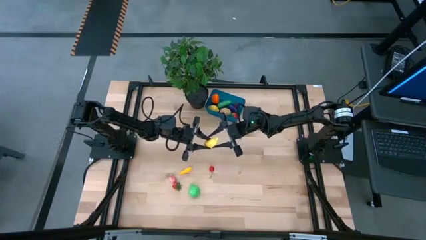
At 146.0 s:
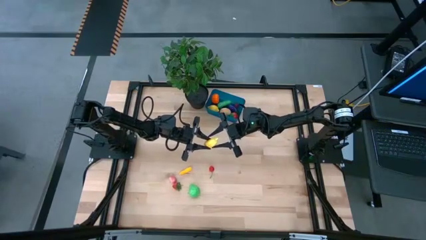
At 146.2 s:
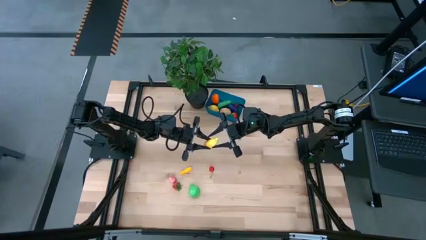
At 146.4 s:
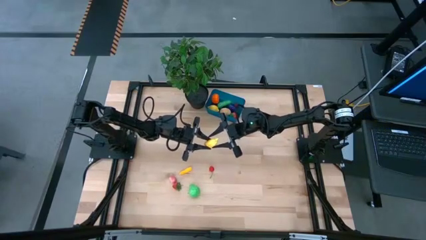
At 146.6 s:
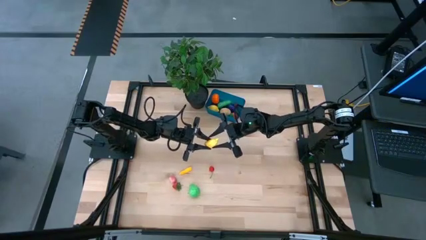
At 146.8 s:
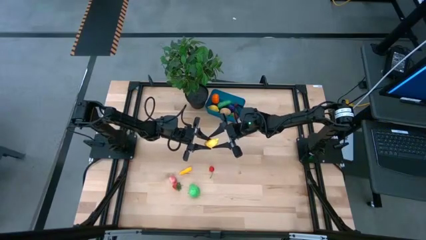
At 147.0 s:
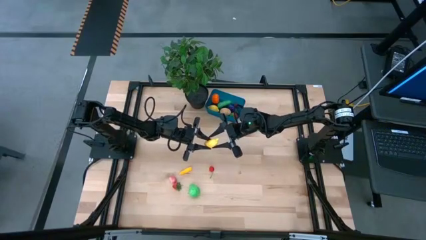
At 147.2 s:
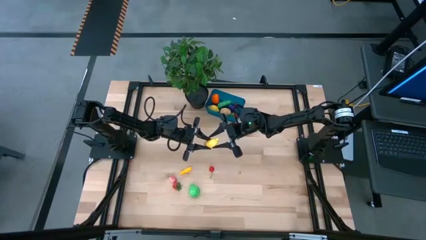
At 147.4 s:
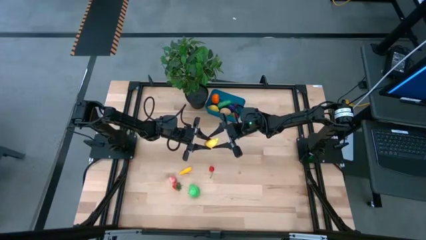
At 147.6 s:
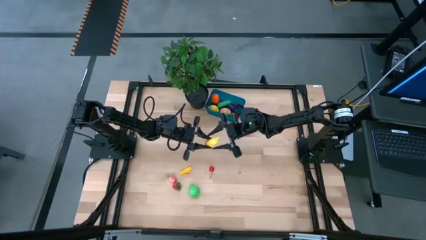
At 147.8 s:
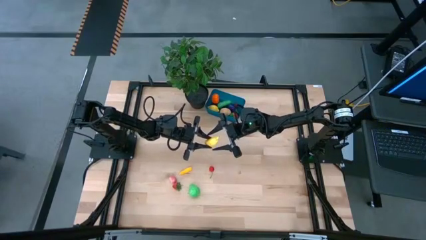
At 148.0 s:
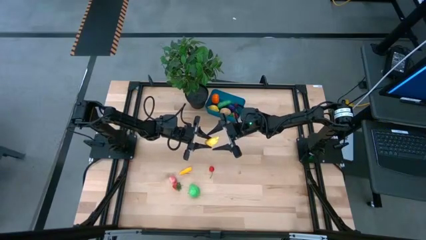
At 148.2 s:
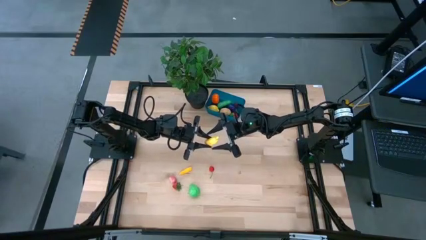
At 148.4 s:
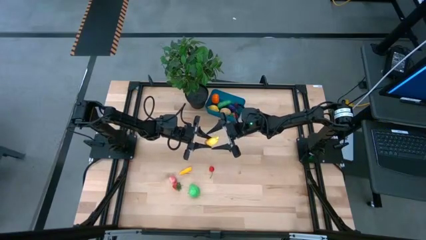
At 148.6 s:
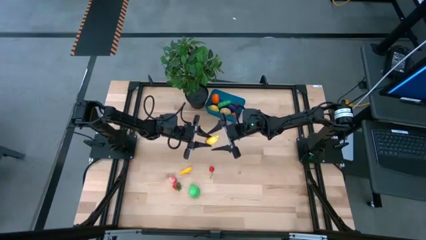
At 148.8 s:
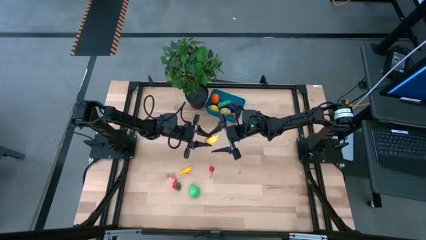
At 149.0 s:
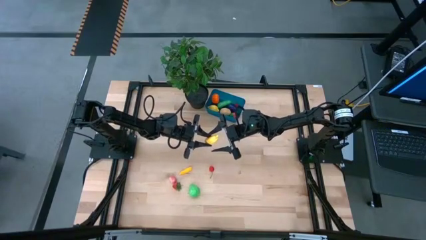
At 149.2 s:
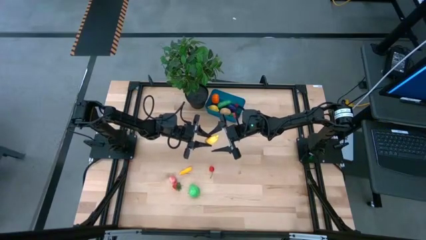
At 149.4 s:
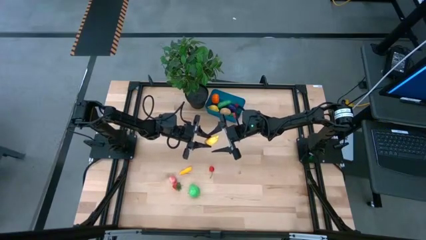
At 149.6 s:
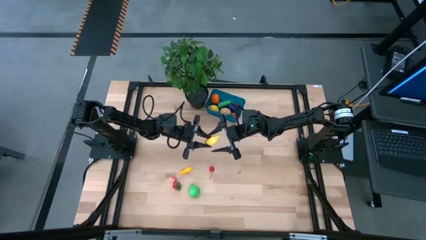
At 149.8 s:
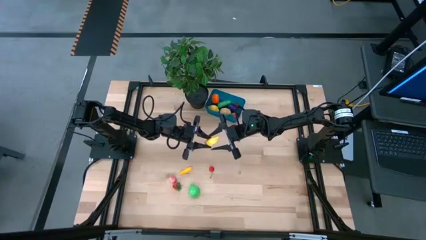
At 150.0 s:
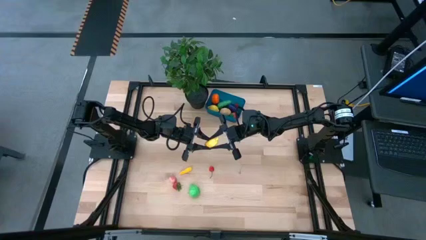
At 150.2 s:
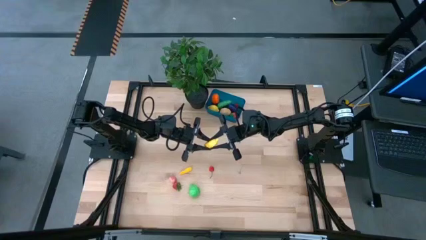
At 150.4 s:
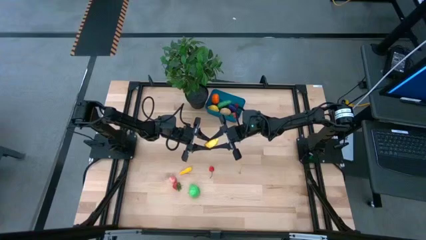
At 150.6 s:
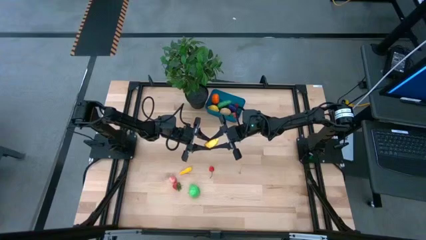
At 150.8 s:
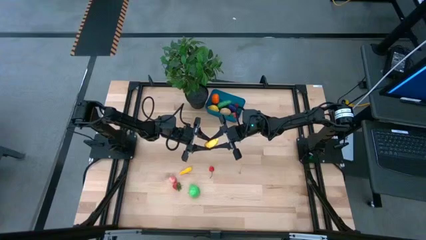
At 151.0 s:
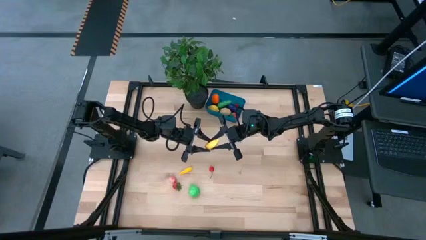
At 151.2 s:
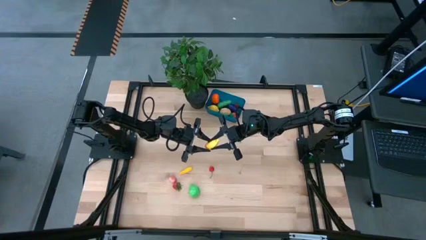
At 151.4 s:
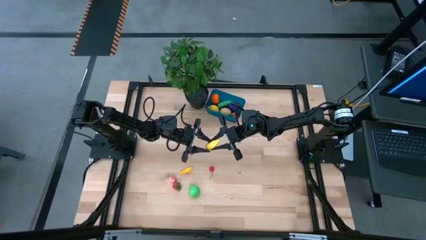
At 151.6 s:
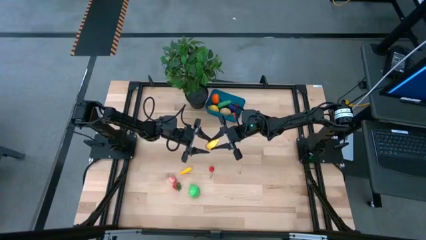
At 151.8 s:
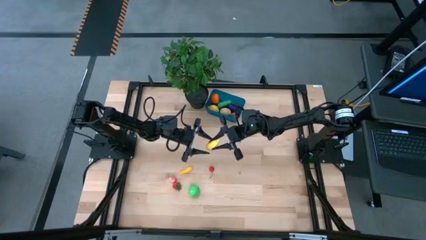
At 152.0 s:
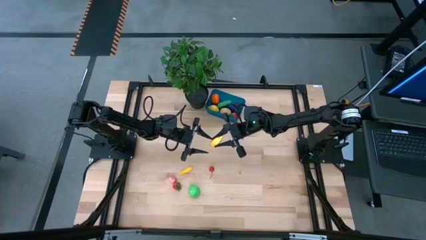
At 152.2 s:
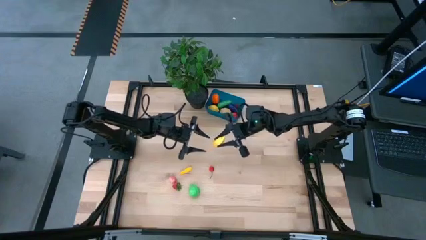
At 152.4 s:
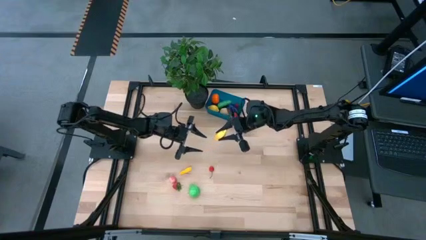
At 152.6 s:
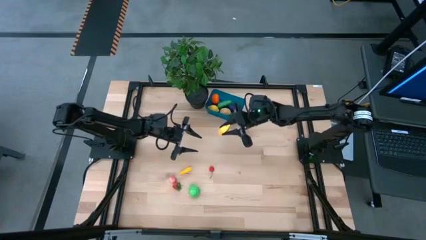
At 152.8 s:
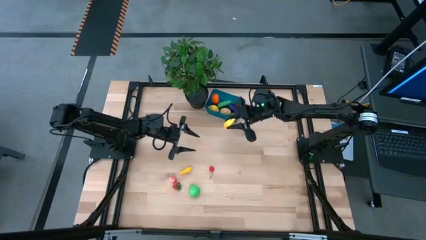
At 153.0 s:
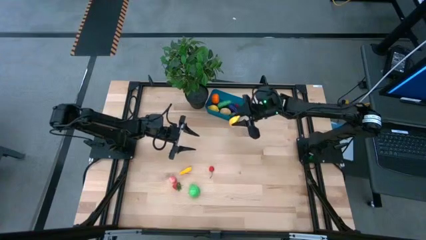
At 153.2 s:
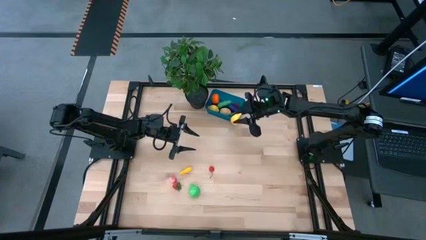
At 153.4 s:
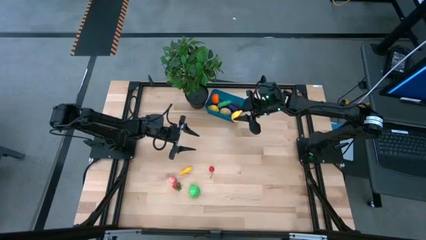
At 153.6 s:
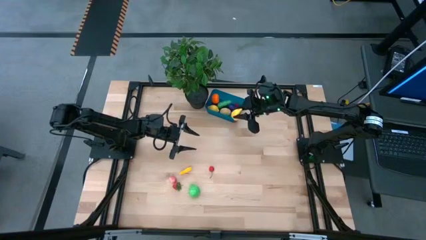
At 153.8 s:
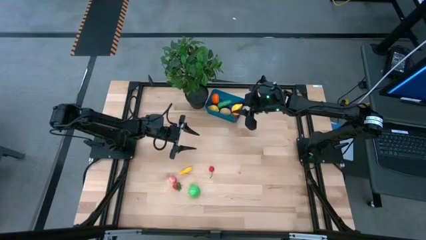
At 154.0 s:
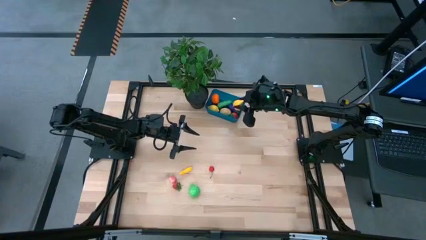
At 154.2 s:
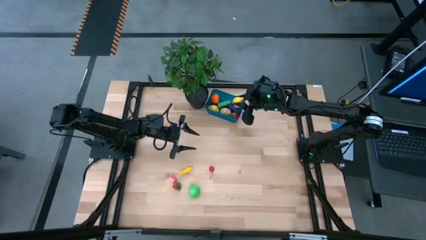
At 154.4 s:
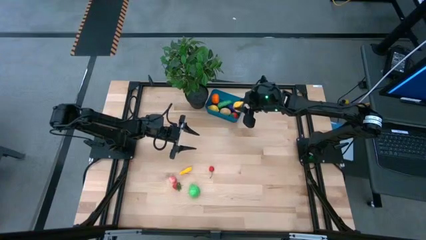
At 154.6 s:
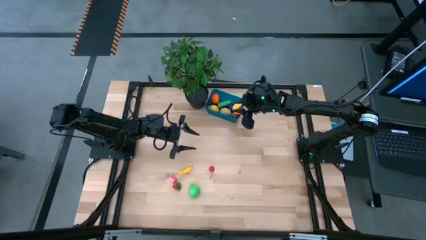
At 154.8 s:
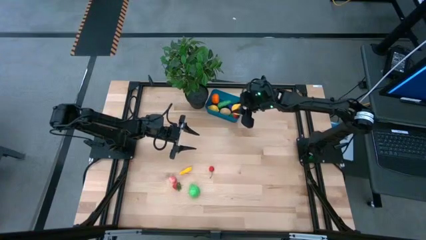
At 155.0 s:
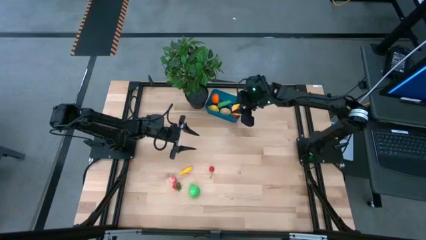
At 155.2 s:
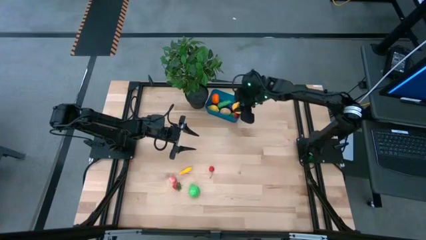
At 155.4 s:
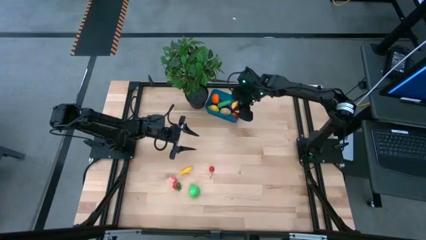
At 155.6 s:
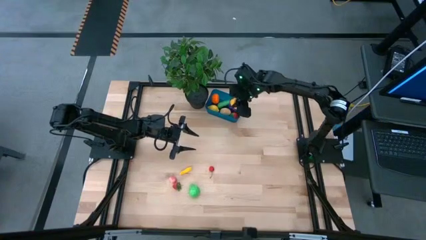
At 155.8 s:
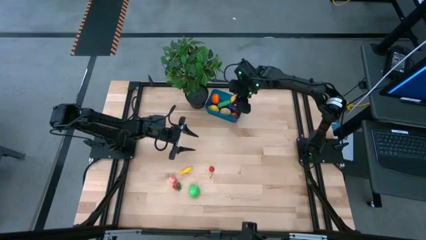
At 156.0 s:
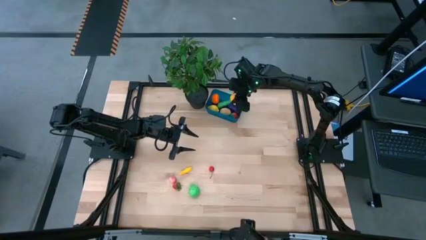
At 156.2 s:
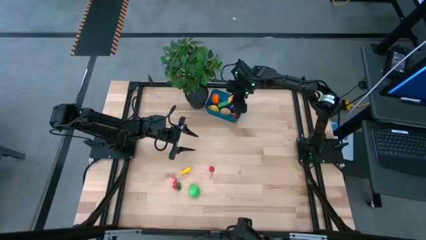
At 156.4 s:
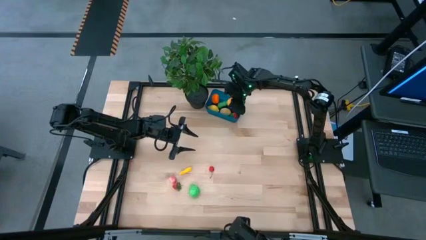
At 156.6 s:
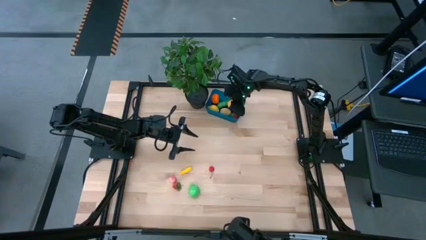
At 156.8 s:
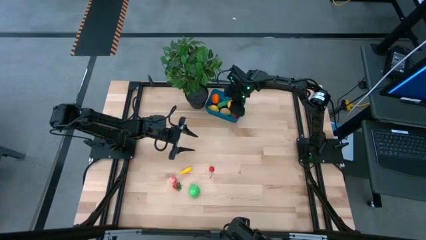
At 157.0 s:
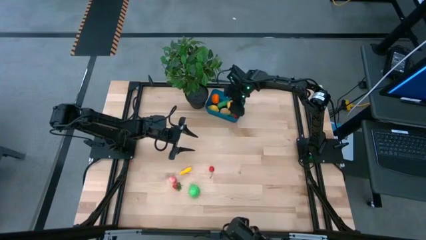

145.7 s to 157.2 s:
Task: Pick and placing Produce into tupperware
Put the yellow banana into the blue container
